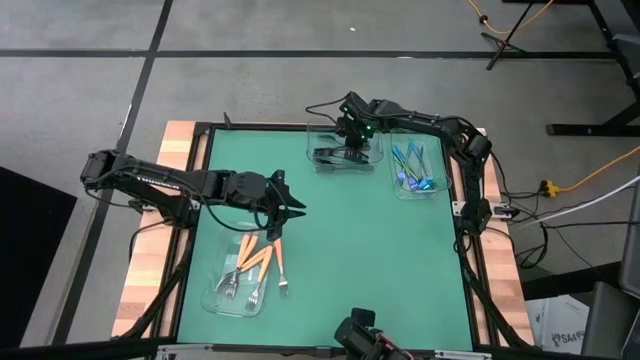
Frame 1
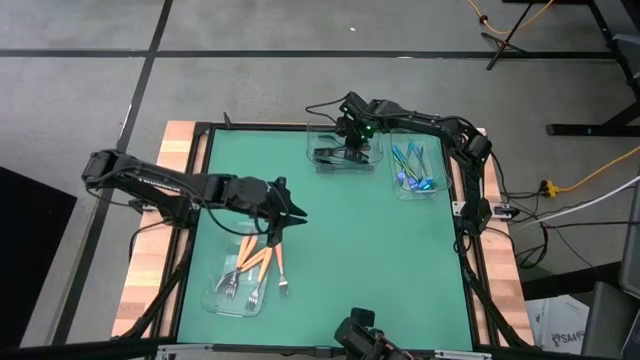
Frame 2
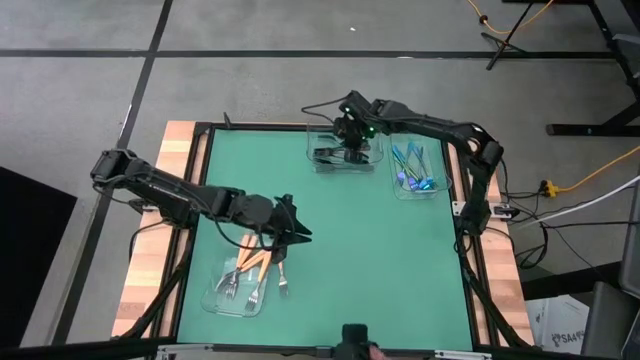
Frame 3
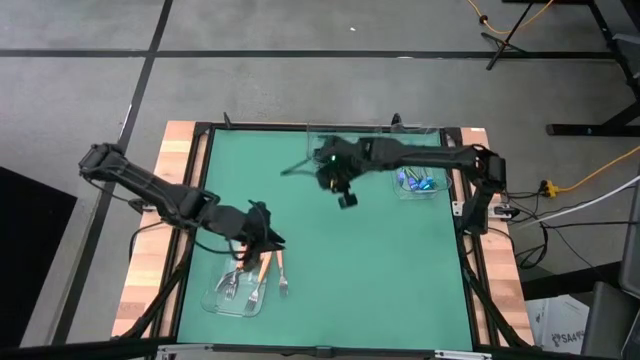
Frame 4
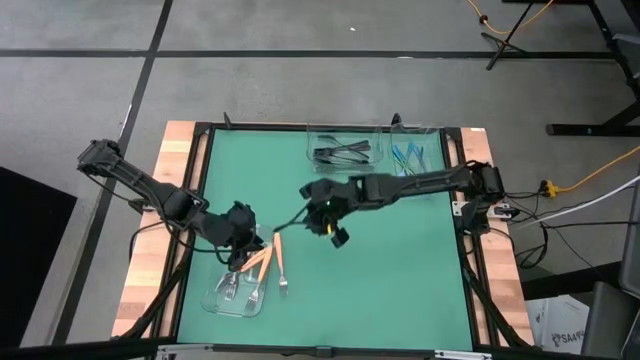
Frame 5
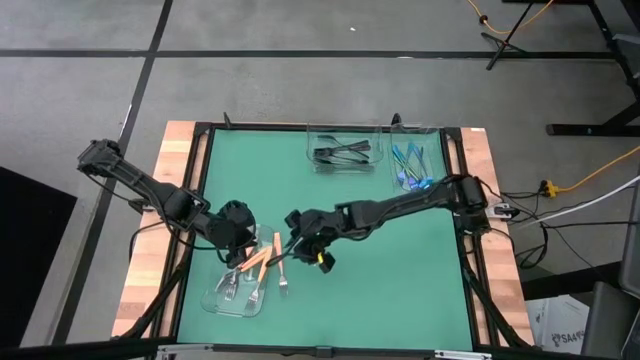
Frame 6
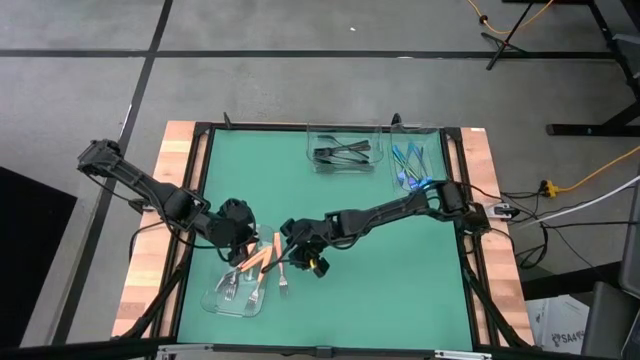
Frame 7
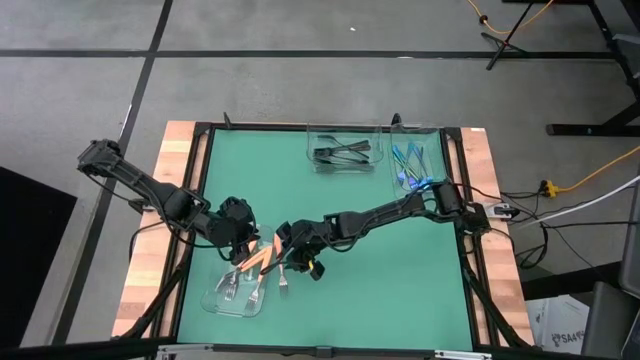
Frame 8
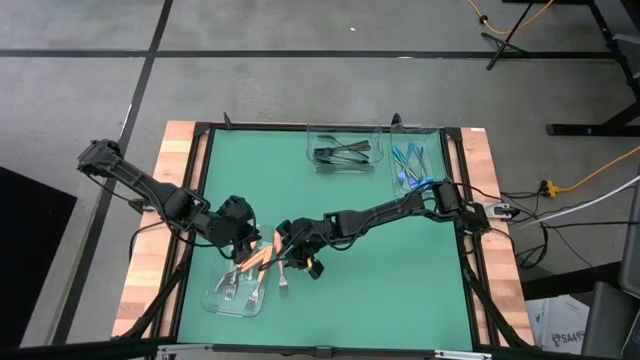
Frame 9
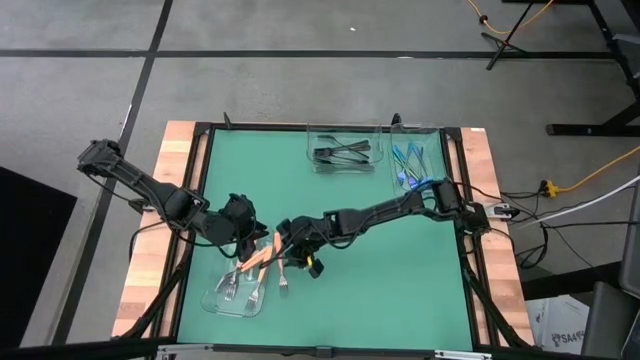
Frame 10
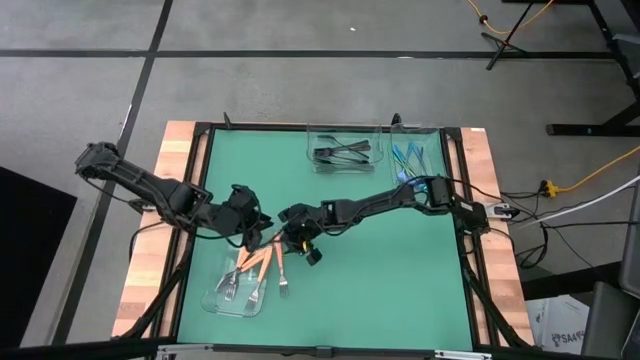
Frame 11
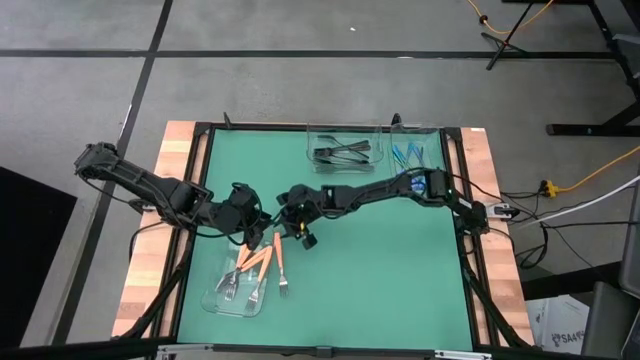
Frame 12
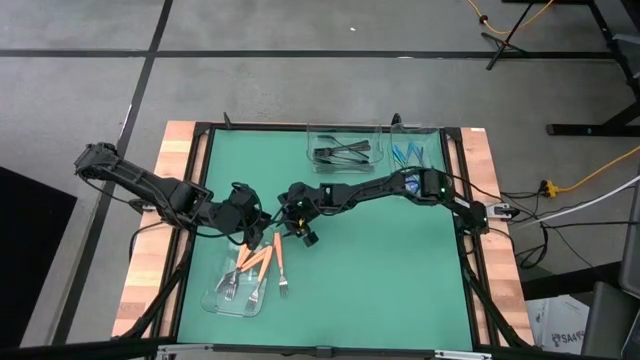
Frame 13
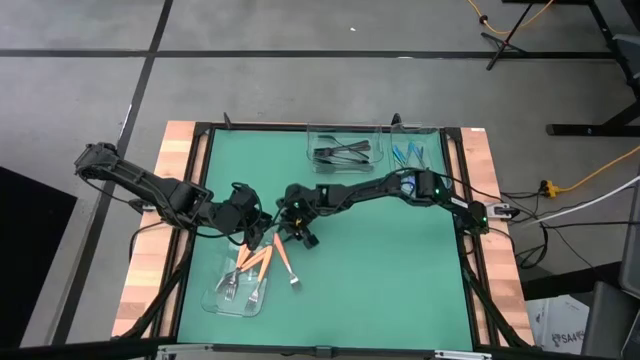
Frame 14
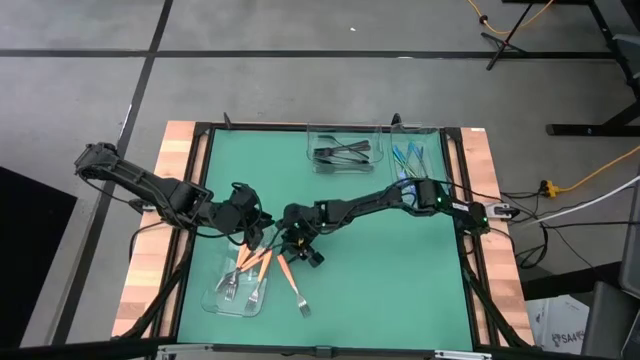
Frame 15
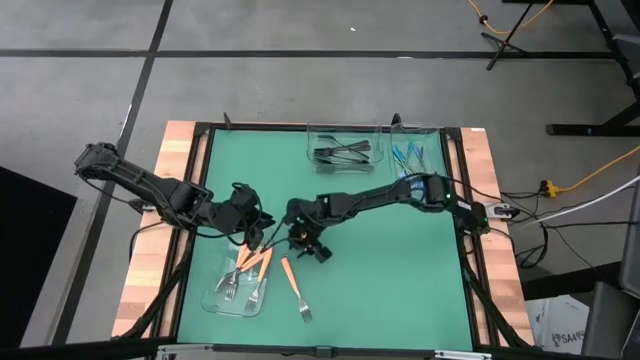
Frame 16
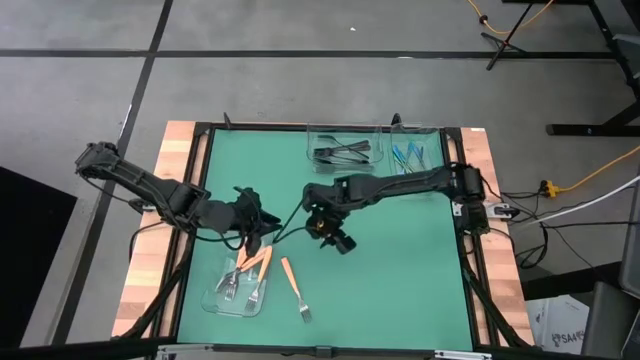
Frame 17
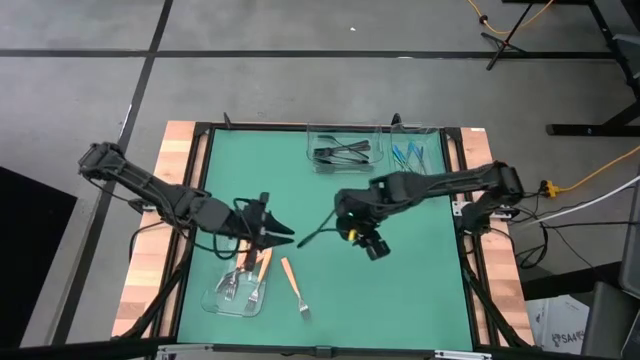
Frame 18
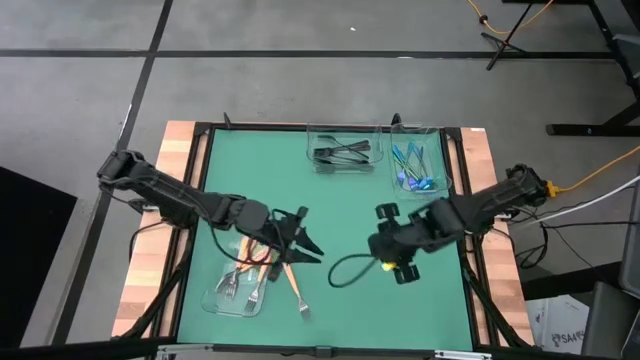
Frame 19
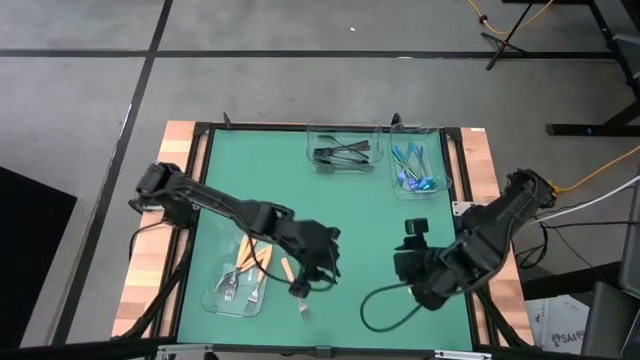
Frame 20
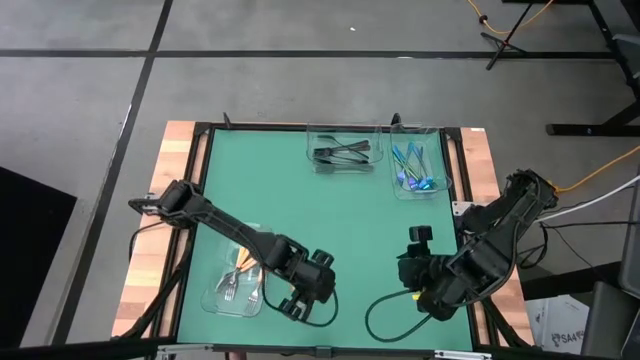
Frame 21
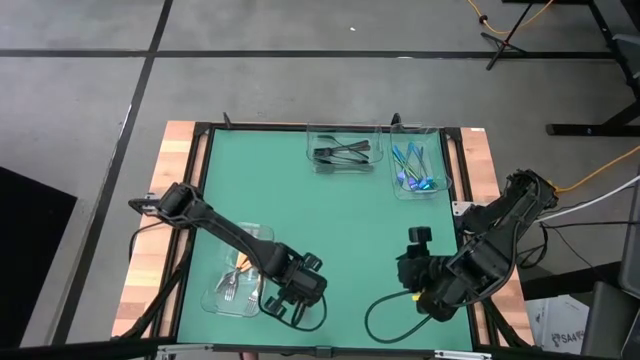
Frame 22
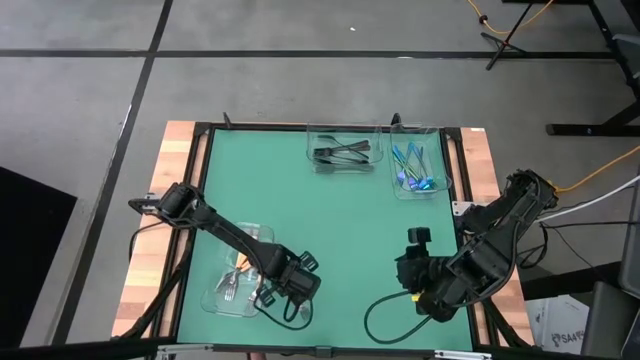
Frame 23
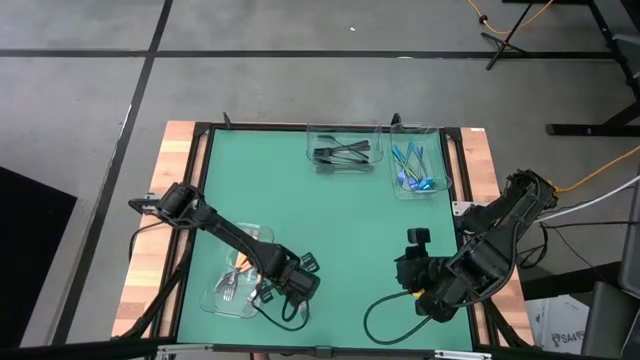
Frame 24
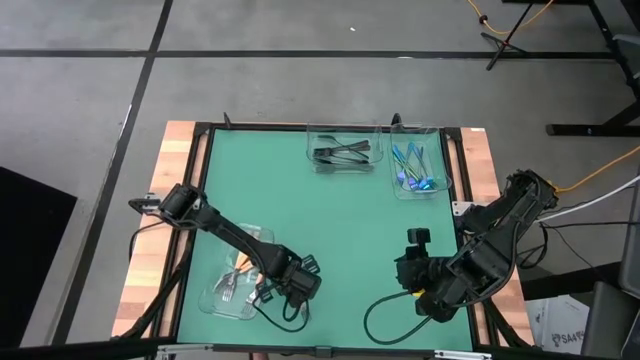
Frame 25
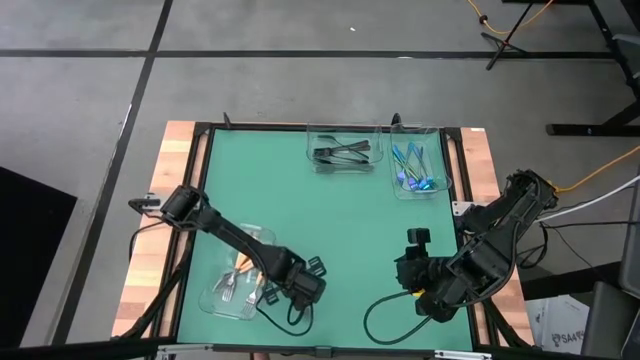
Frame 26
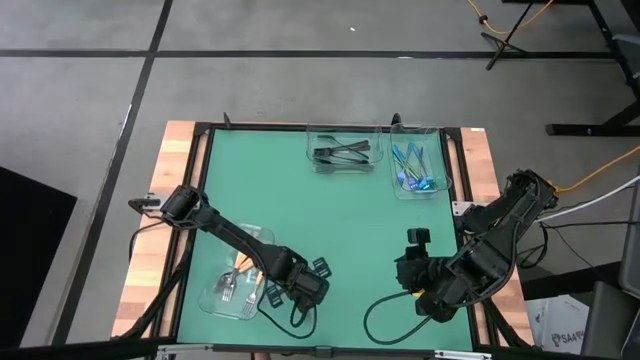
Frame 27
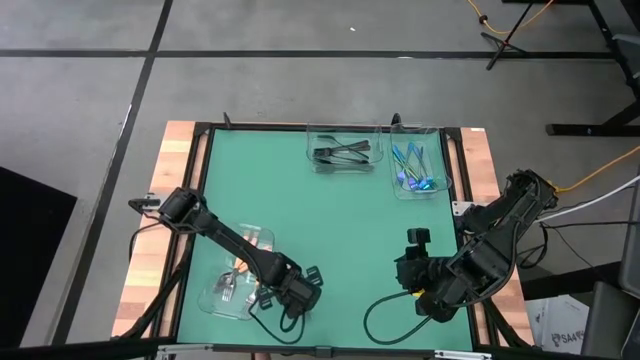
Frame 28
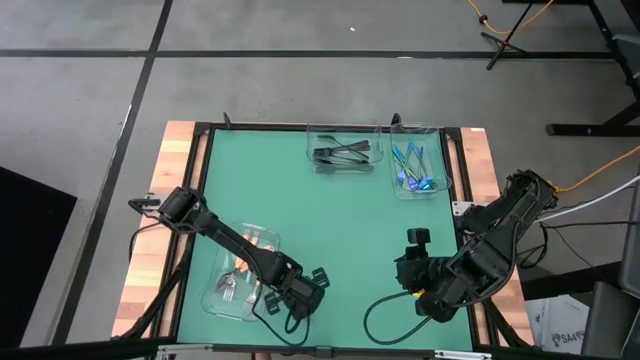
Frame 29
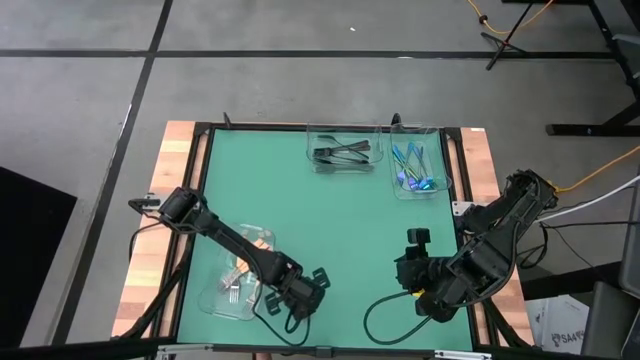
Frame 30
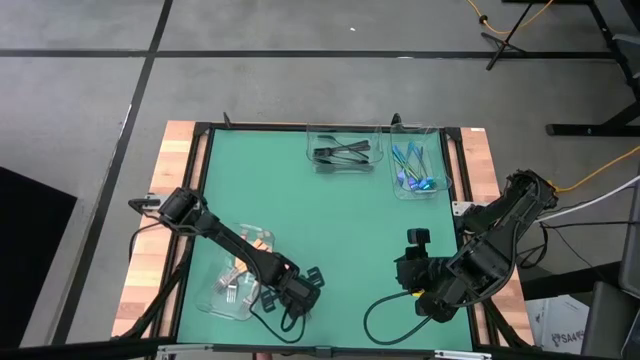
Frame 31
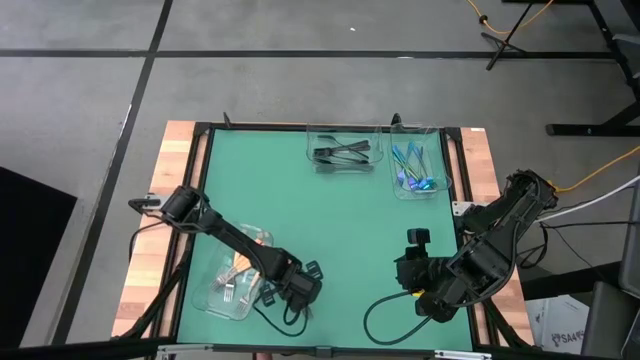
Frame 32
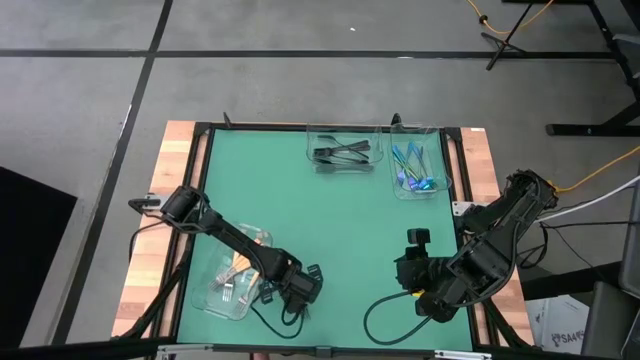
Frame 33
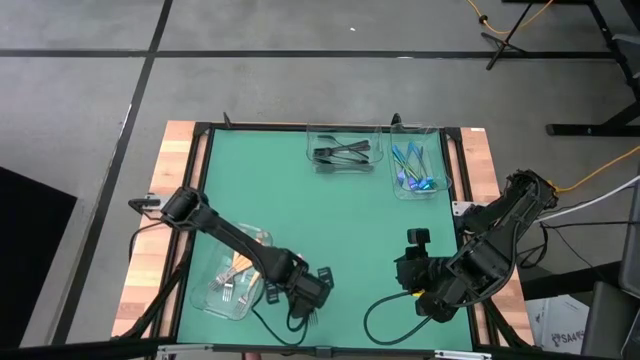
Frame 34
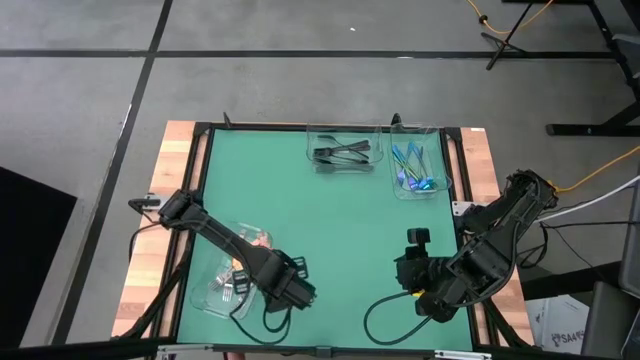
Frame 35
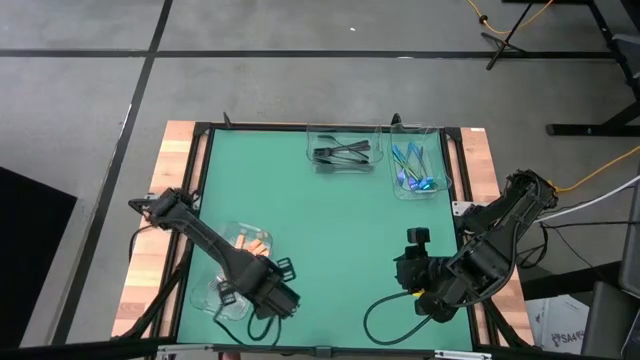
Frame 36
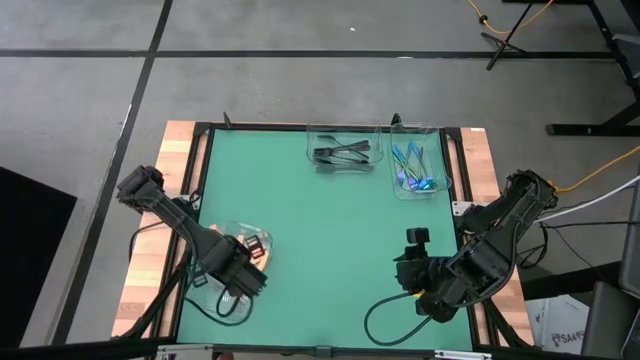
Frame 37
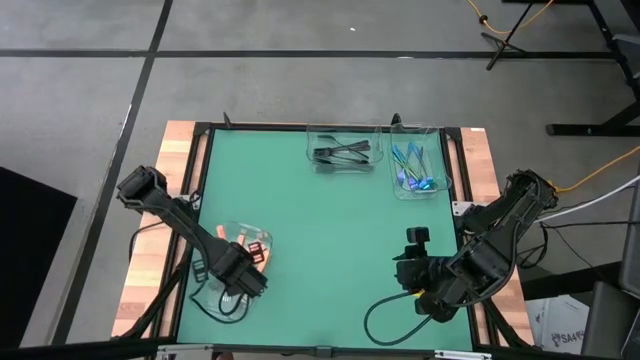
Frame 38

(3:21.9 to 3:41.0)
Task: Sort silverware by color (type)
Put the orange fork into the bottom transparent bin

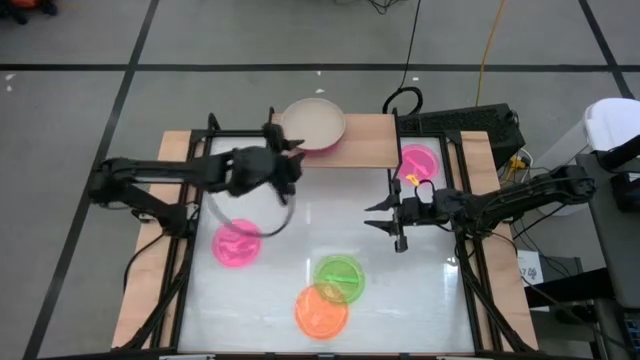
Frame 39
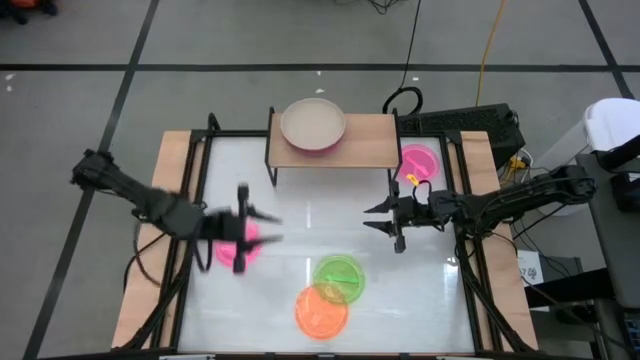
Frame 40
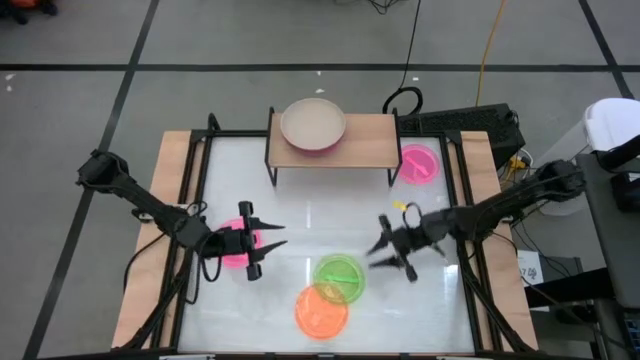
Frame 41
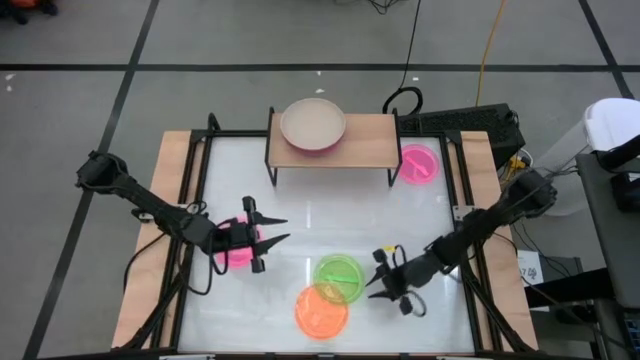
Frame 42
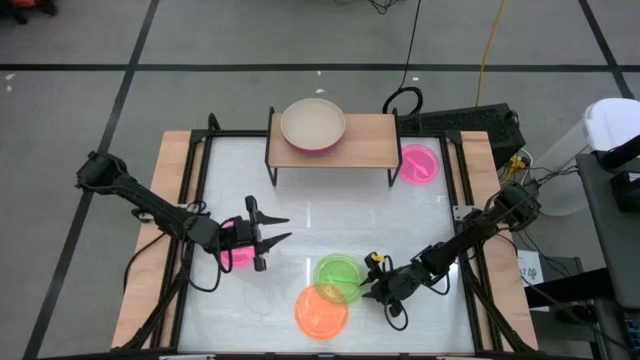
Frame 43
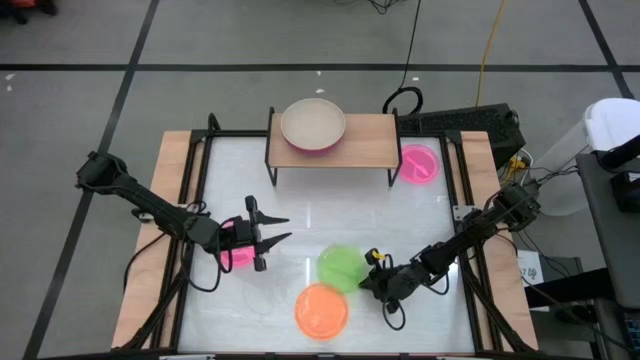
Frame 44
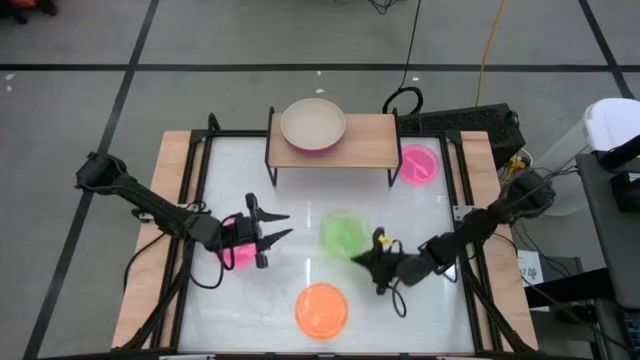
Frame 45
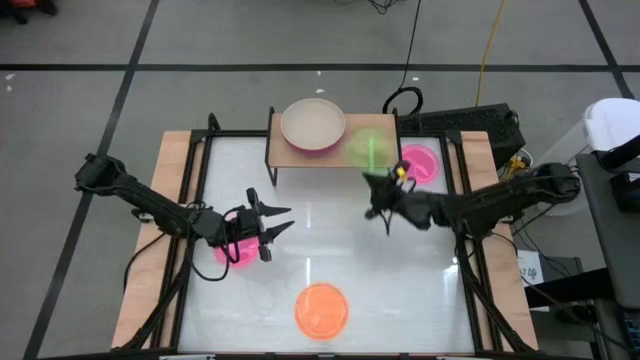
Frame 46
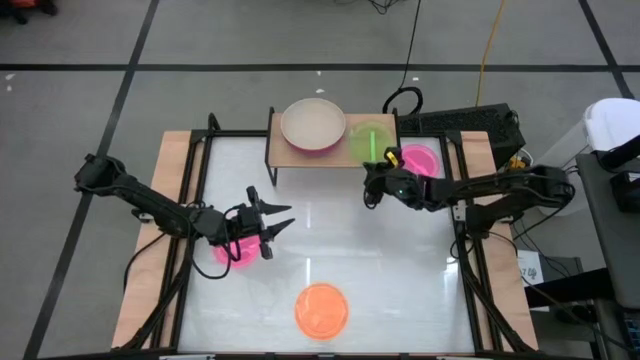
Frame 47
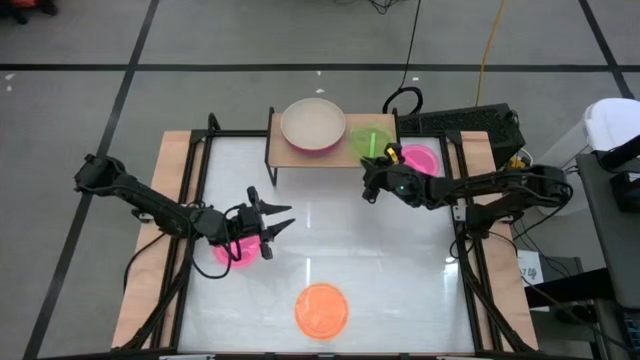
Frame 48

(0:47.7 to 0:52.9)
Task: Place and stack plates onto a shelf
Put the green plate on the shelf
